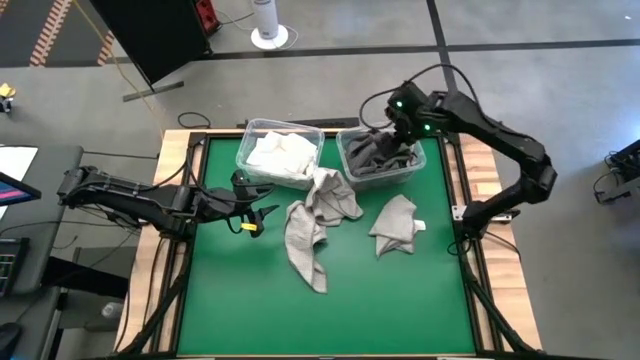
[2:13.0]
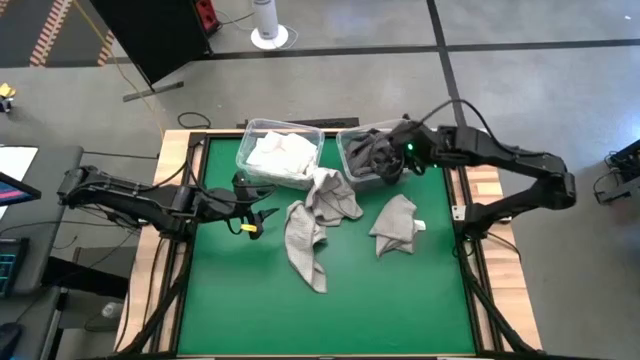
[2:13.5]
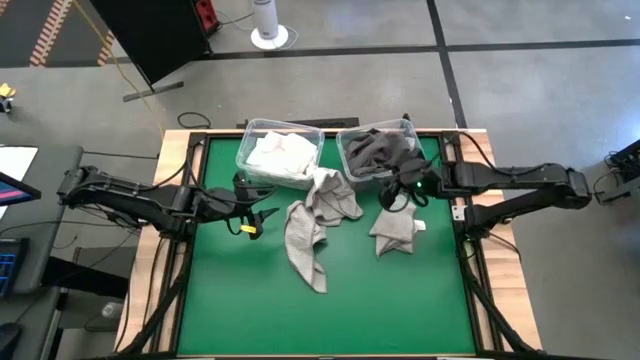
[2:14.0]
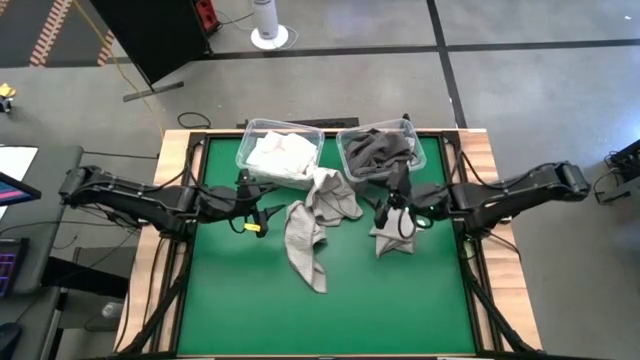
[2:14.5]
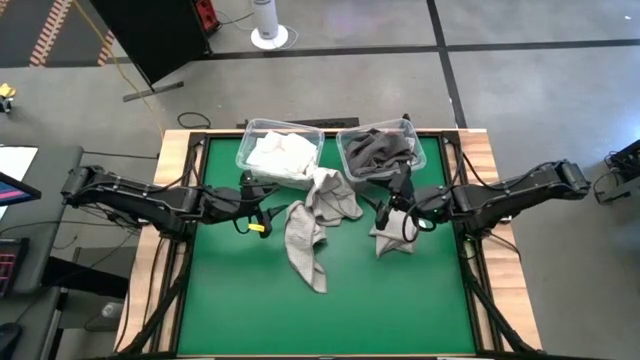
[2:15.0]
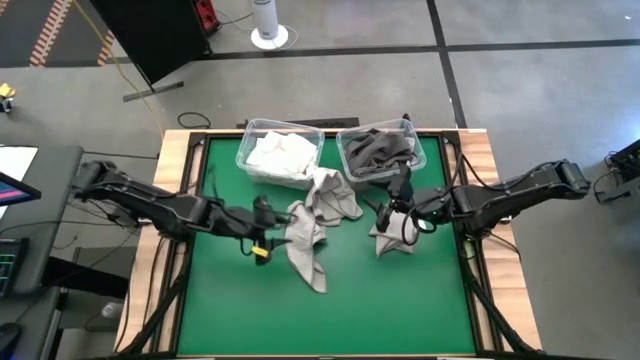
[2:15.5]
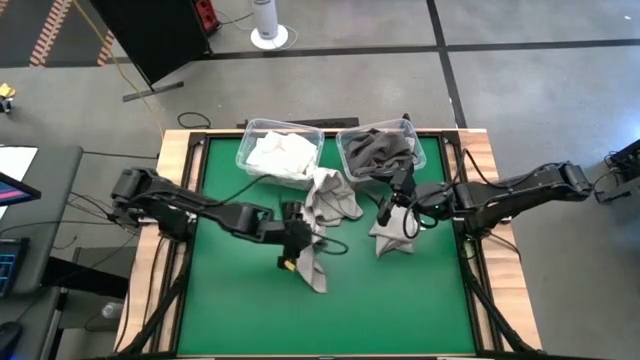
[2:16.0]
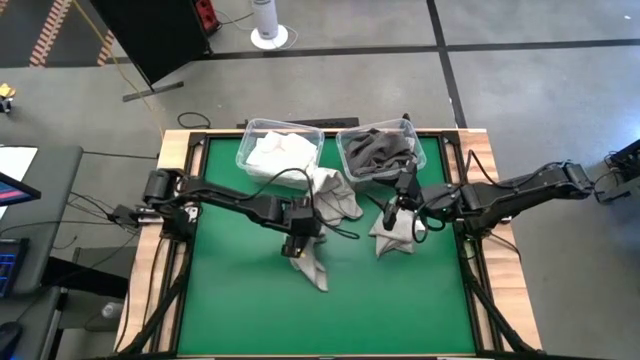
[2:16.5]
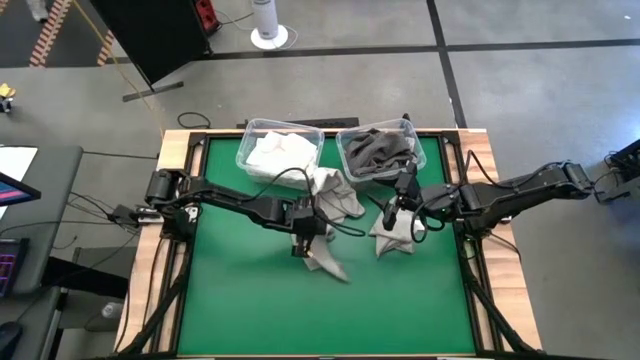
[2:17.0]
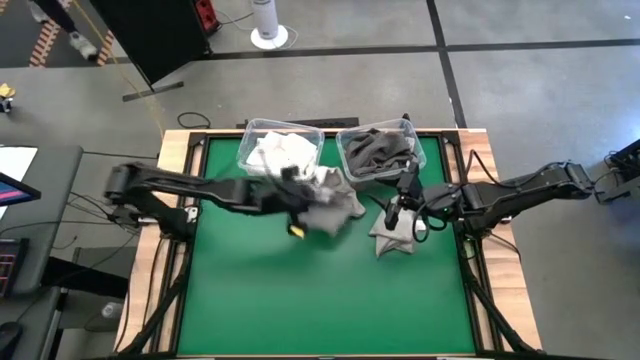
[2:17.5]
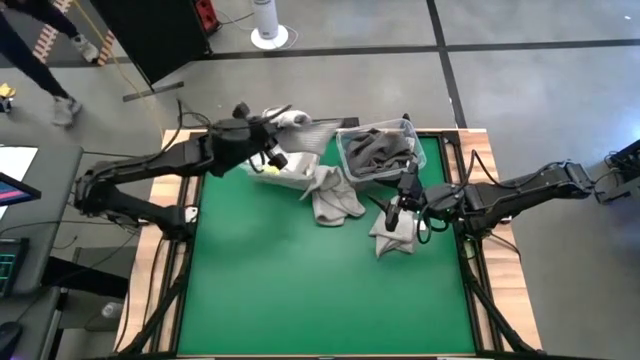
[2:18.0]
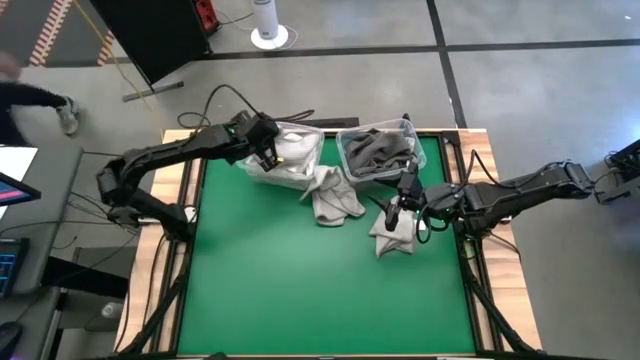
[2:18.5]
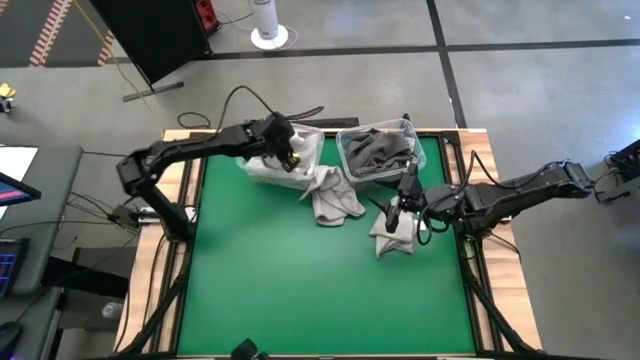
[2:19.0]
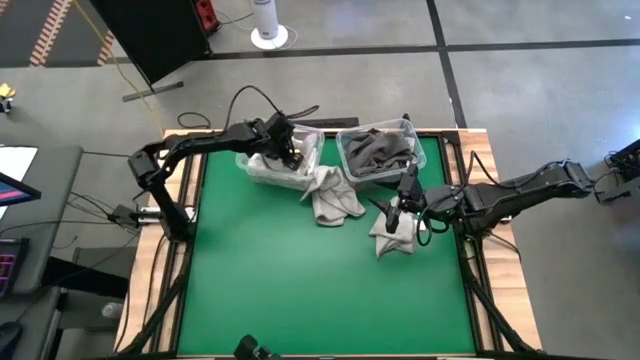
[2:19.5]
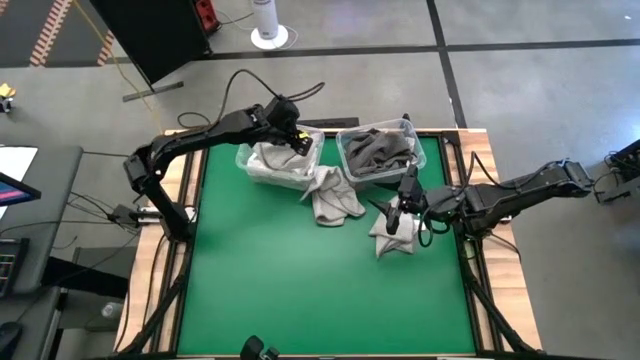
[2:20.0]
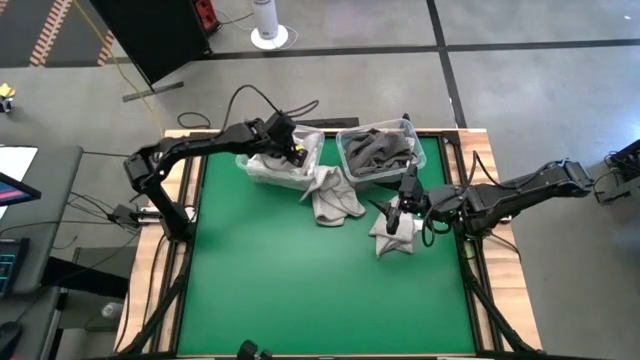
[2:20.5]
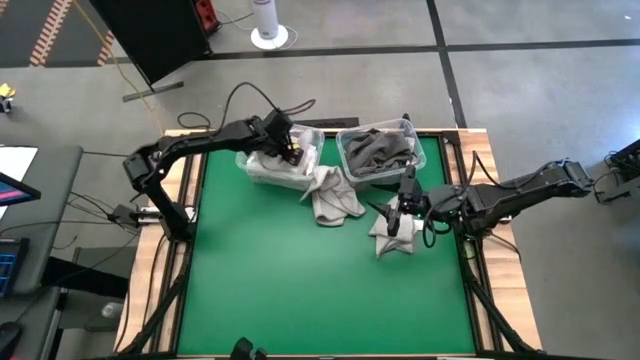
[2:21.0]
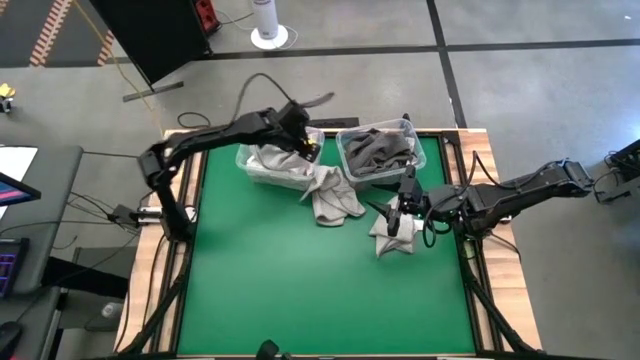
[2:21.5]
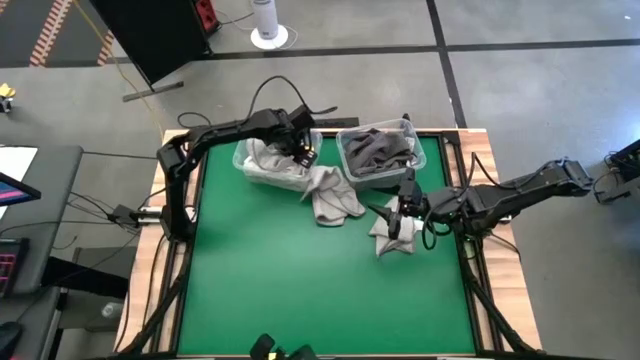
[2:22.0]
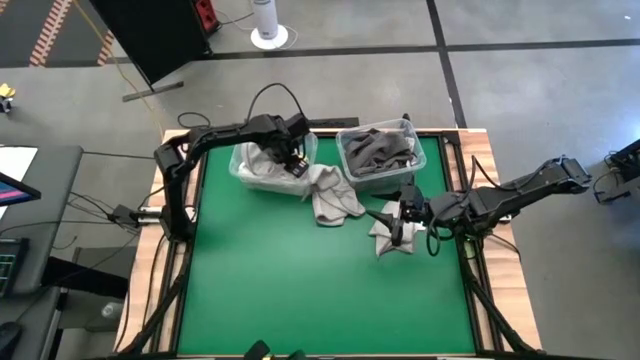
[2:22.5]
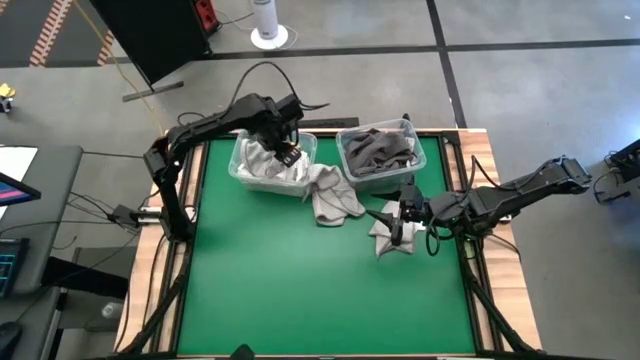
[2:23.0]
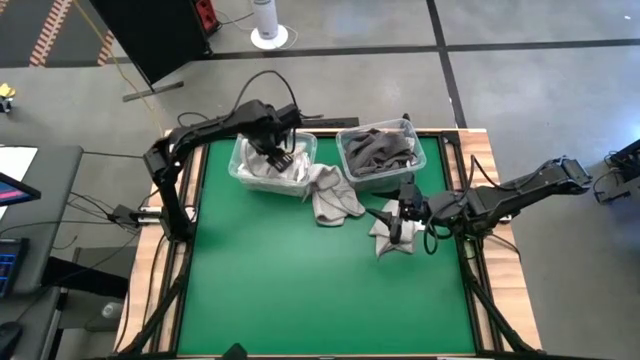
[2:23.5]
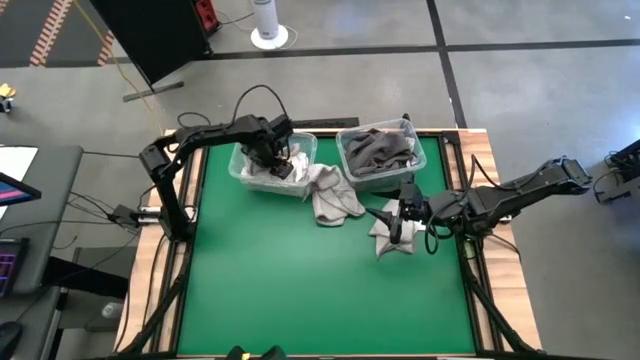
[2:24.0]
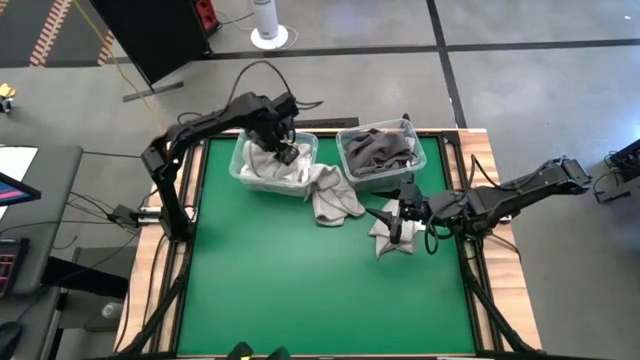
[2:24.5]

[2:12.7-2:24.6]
Task: Sort towels by color in basket
Put the gray microfiber towel into the left transparent bin

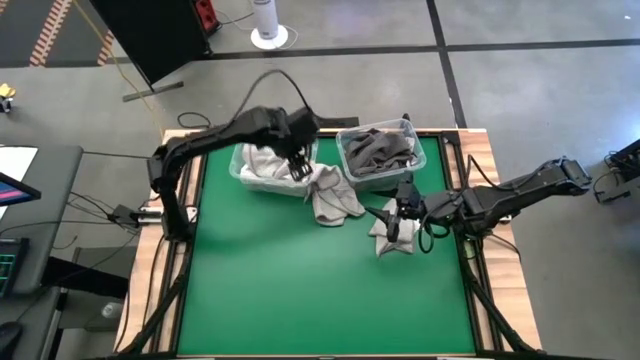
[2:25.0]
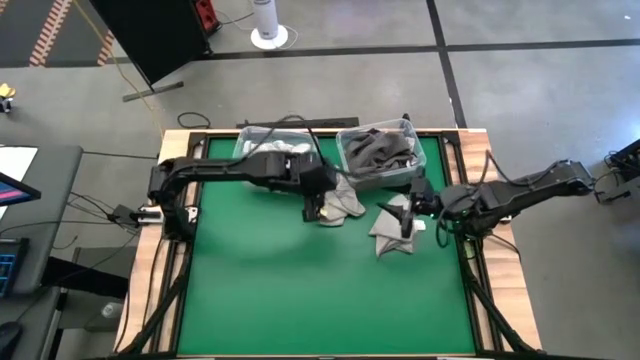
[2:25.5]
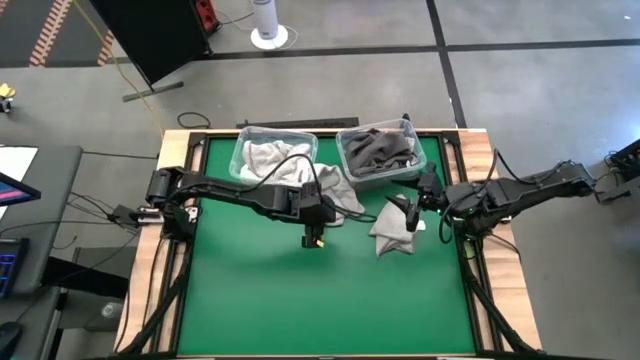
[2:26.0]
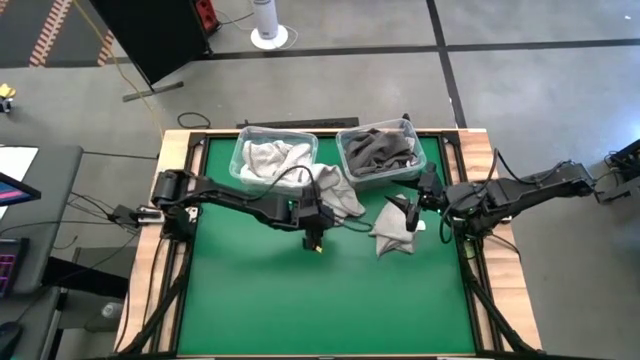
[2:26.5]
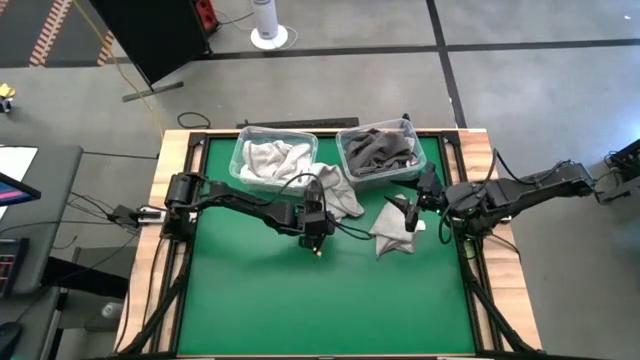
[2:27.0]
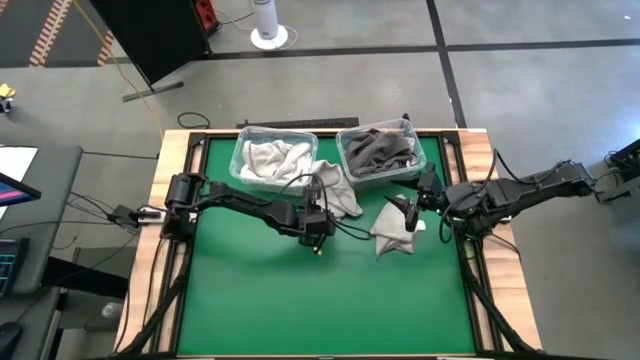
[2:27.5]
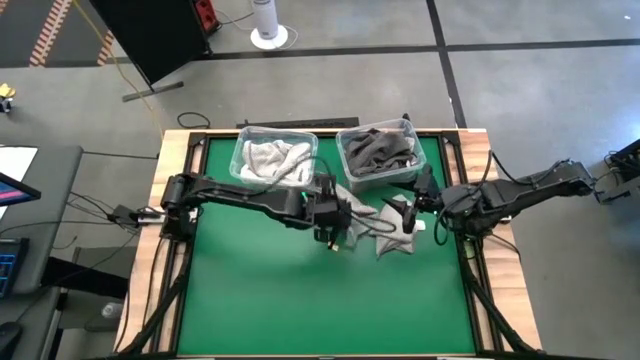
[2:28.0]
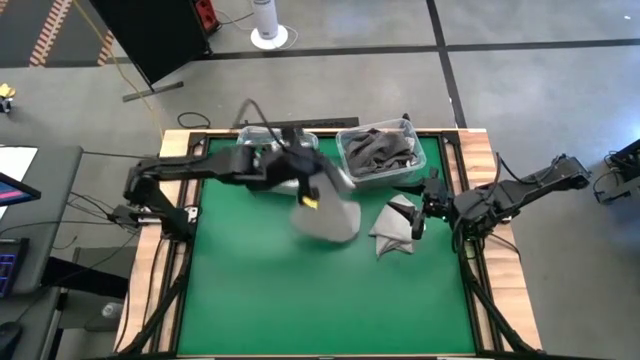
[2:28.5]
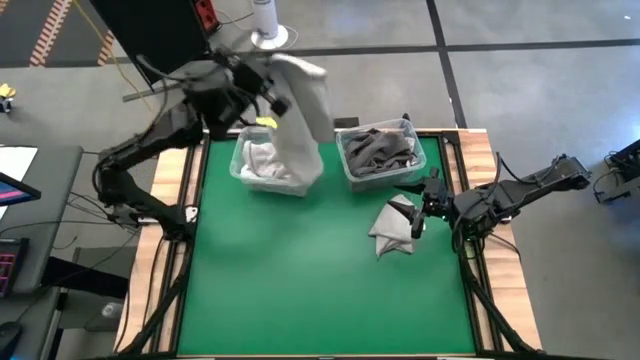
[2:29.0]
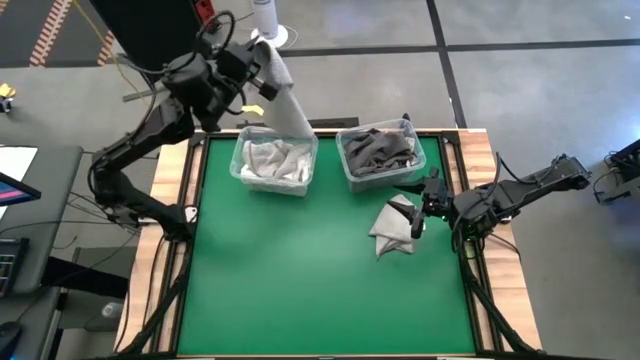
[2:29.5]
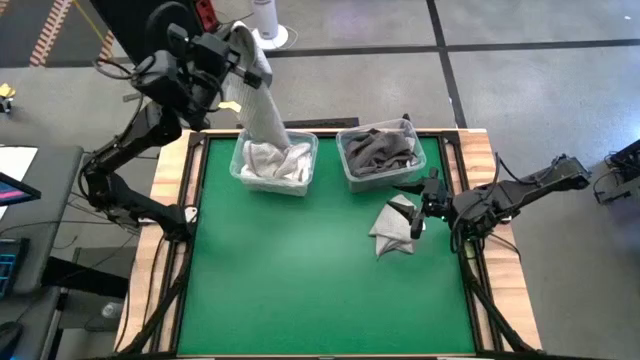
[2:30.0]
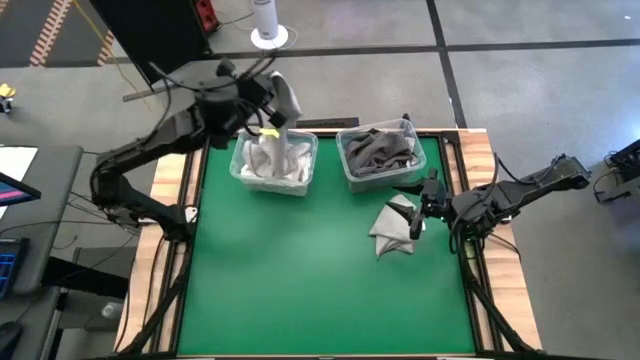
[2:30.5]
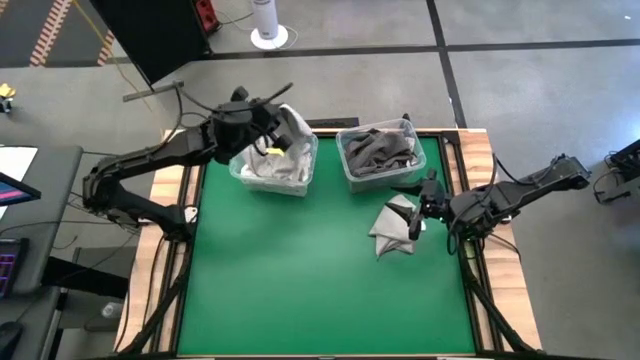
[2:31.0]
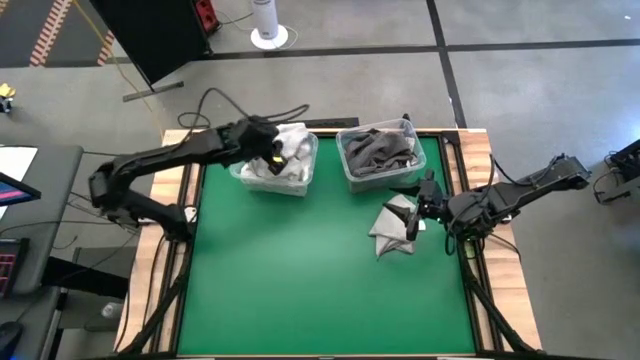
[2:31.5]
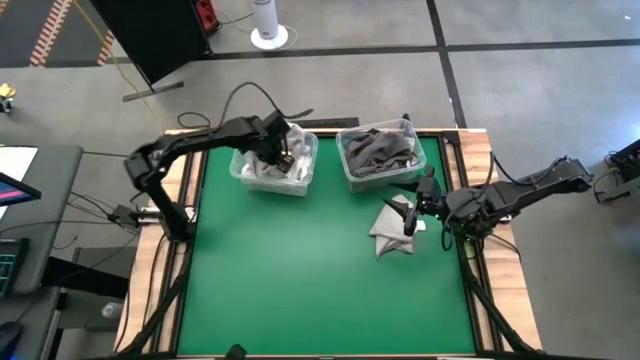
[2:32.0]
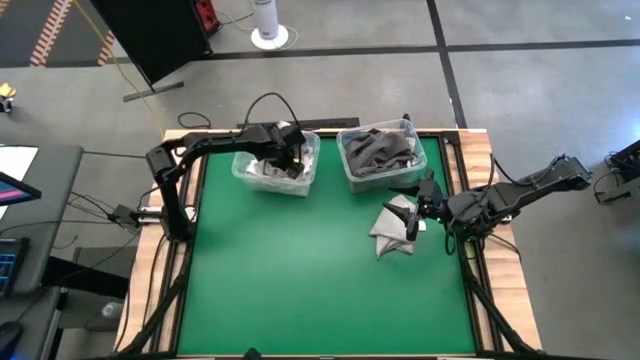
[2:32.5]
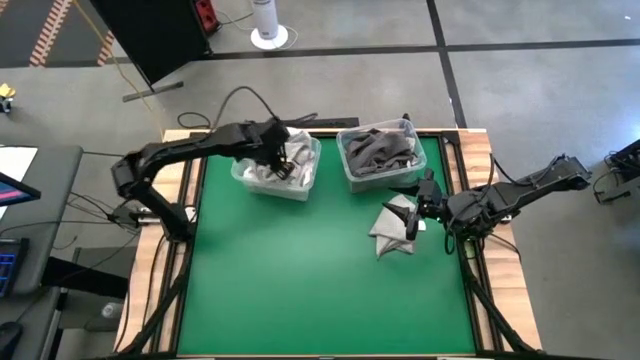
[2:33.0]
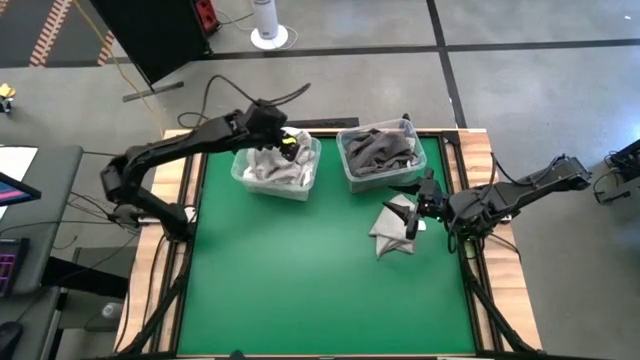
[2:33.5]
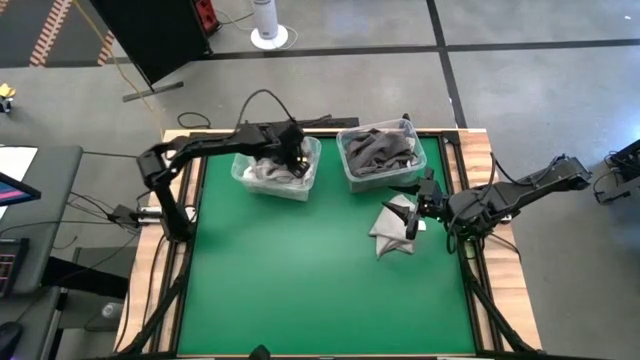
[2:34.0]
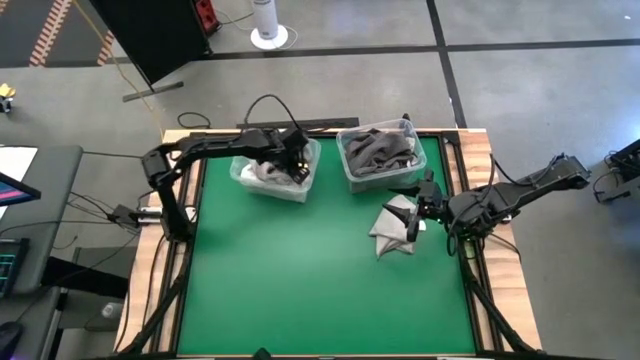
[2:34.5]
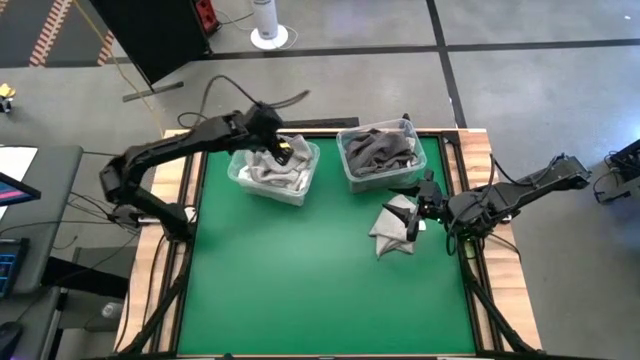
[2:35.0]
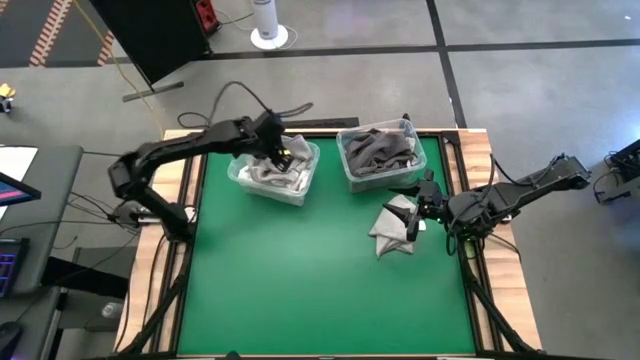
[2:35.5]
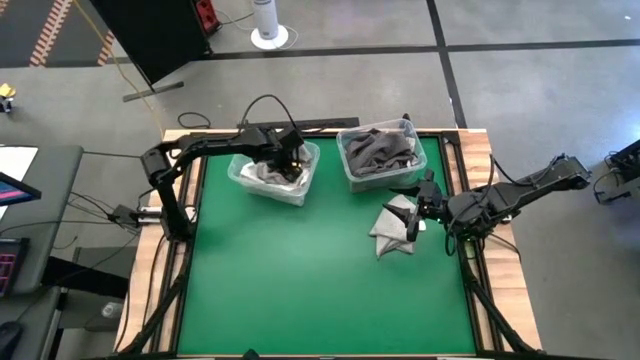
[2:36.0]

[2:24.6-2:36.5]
Put the gray microfiber towel into the left transparent bin
